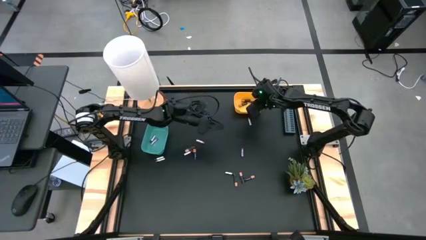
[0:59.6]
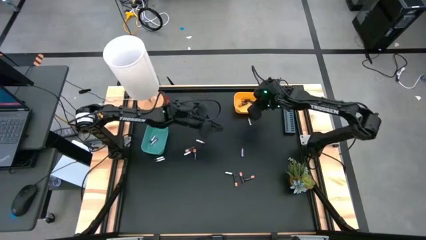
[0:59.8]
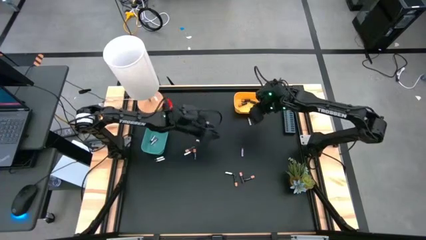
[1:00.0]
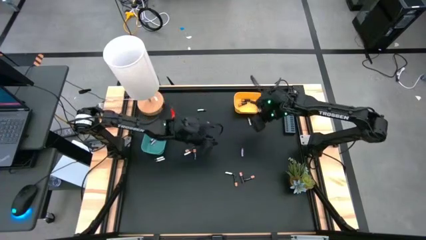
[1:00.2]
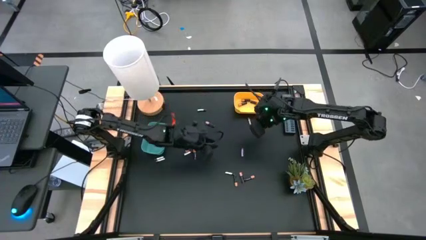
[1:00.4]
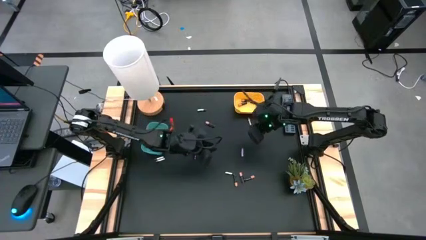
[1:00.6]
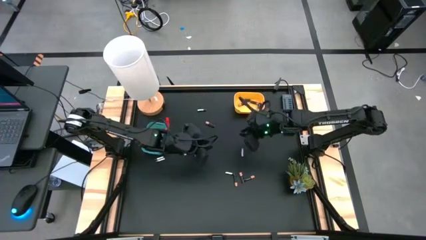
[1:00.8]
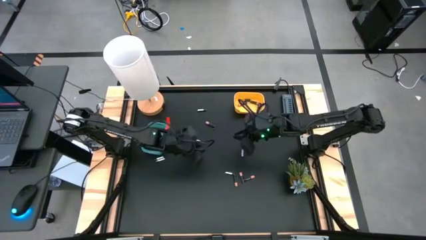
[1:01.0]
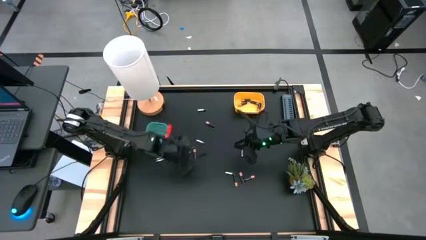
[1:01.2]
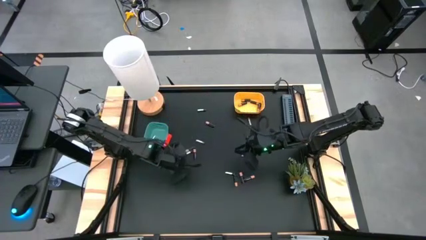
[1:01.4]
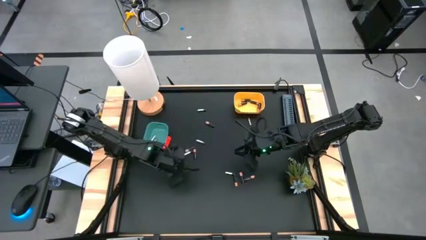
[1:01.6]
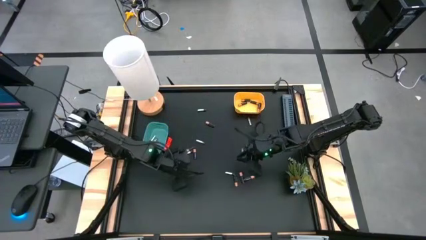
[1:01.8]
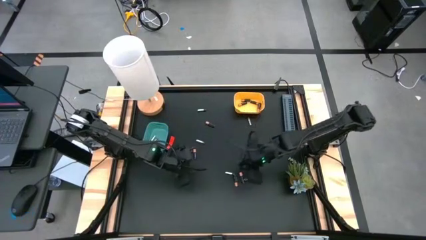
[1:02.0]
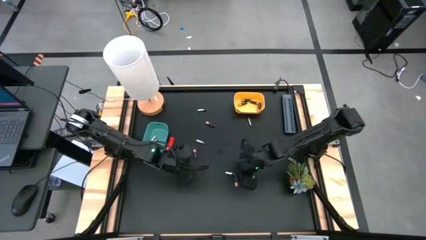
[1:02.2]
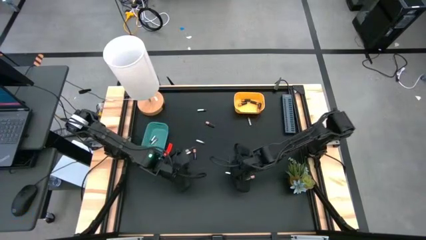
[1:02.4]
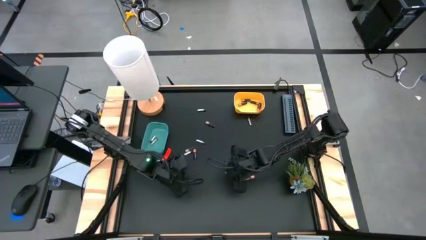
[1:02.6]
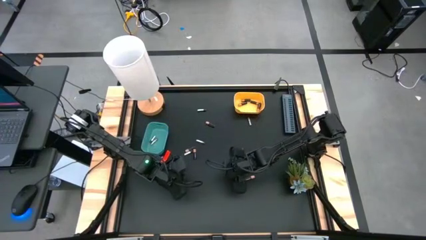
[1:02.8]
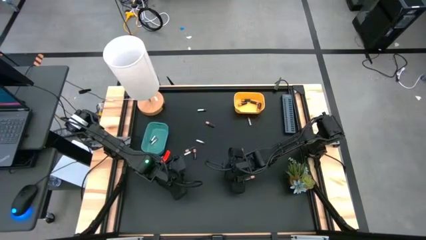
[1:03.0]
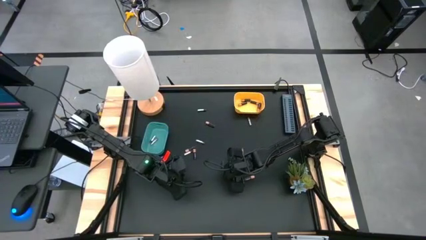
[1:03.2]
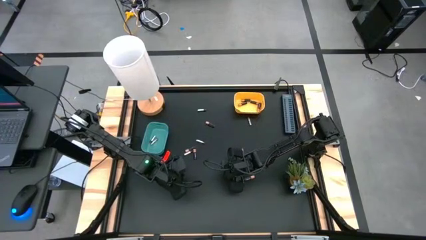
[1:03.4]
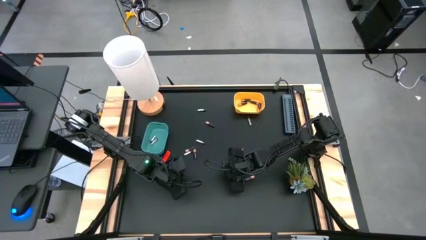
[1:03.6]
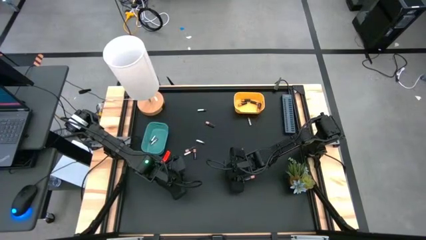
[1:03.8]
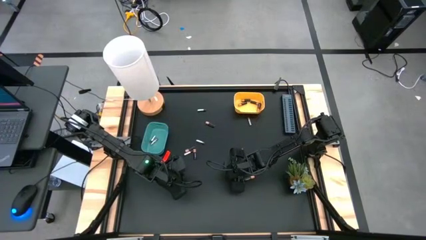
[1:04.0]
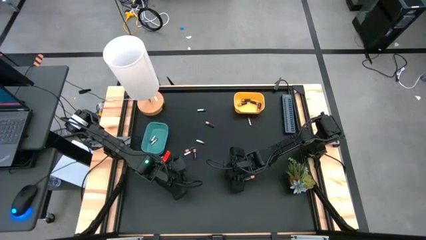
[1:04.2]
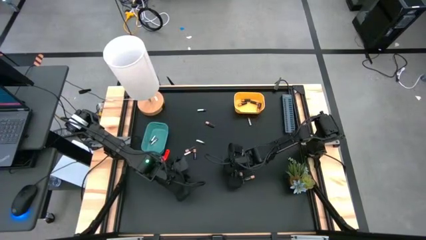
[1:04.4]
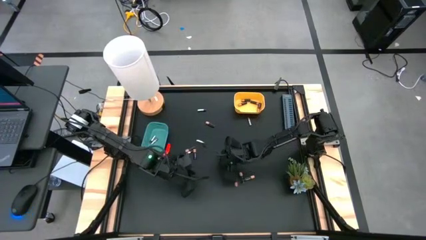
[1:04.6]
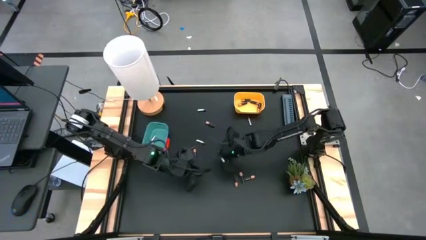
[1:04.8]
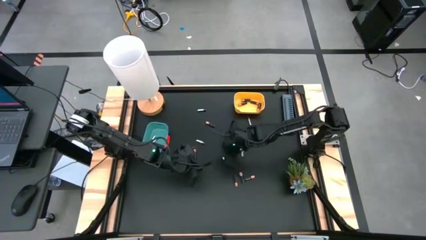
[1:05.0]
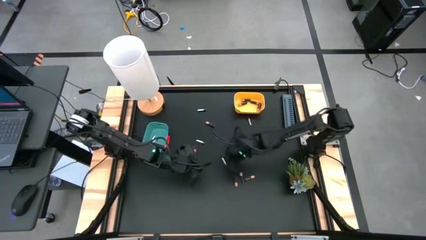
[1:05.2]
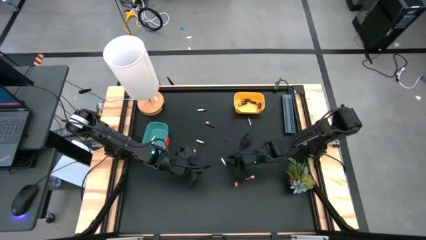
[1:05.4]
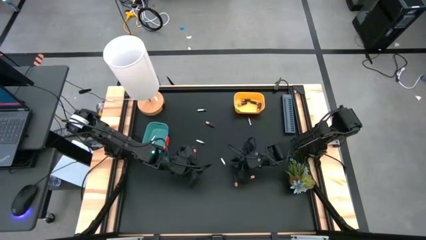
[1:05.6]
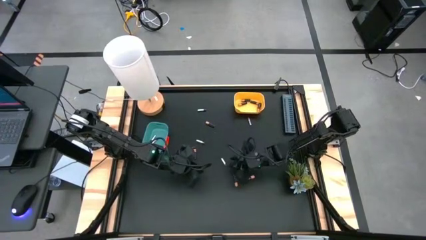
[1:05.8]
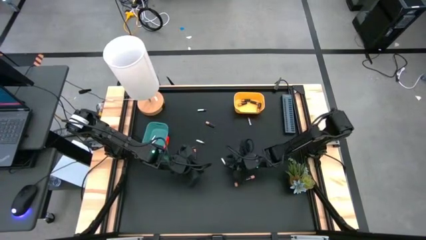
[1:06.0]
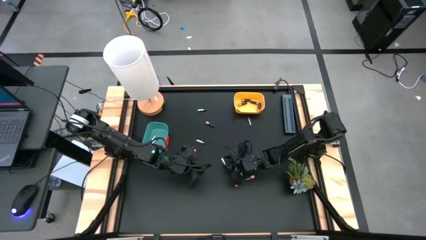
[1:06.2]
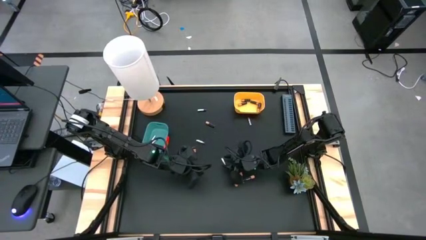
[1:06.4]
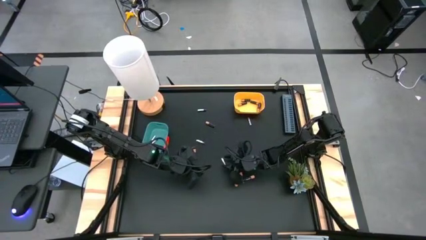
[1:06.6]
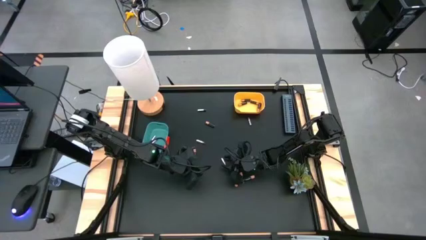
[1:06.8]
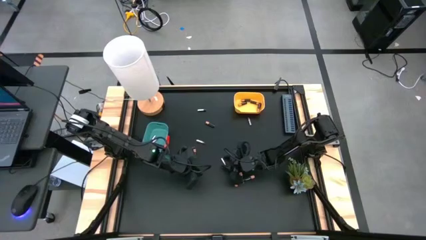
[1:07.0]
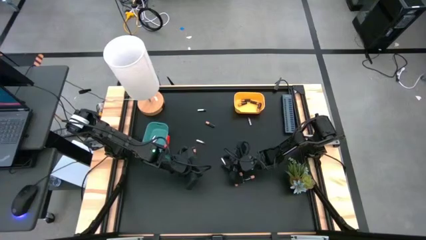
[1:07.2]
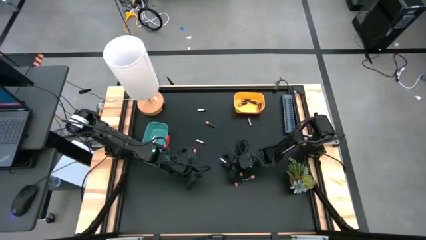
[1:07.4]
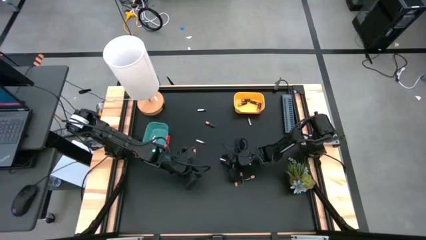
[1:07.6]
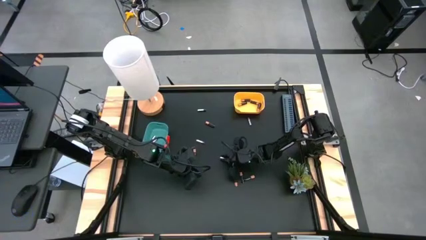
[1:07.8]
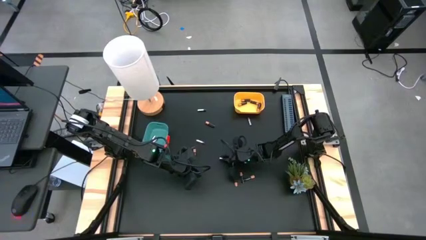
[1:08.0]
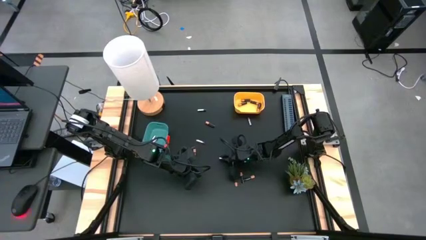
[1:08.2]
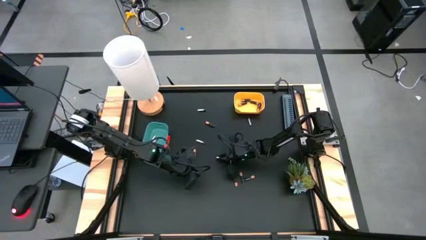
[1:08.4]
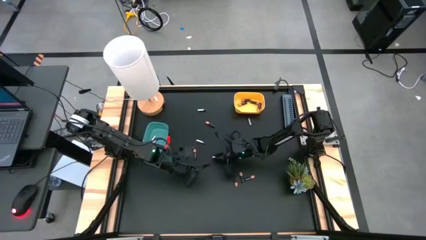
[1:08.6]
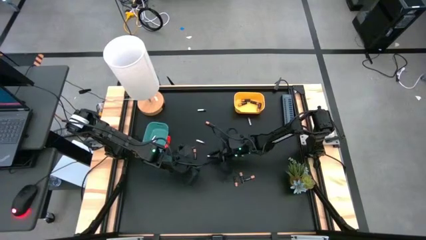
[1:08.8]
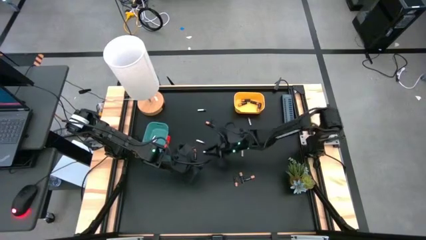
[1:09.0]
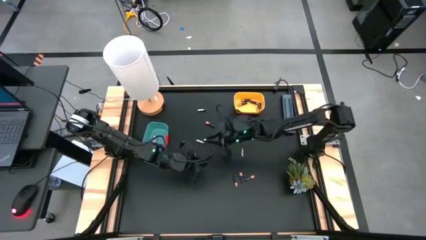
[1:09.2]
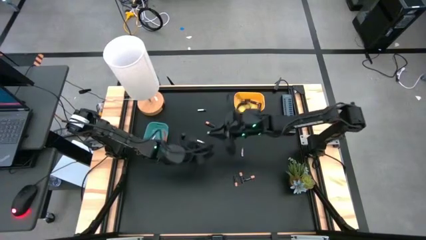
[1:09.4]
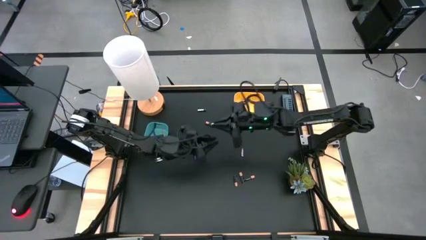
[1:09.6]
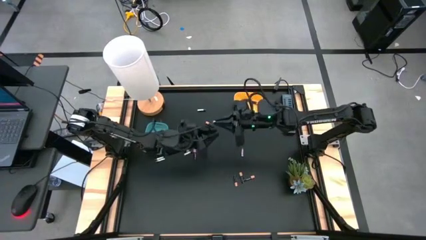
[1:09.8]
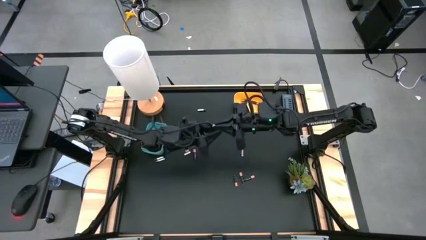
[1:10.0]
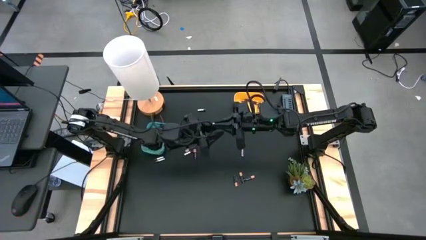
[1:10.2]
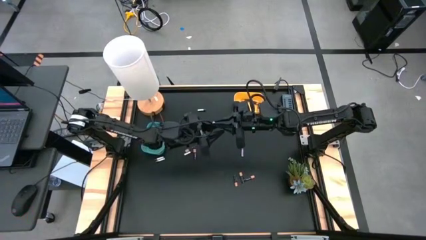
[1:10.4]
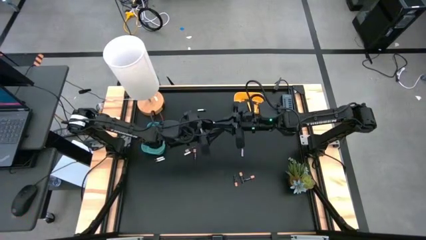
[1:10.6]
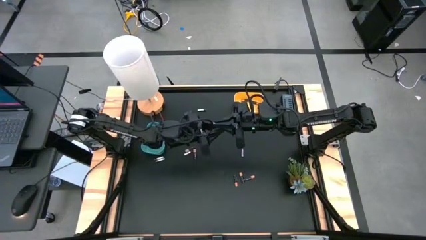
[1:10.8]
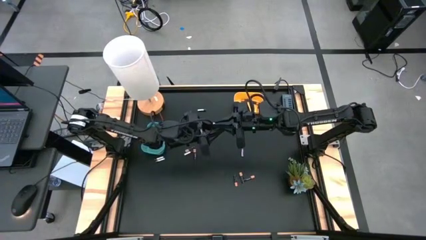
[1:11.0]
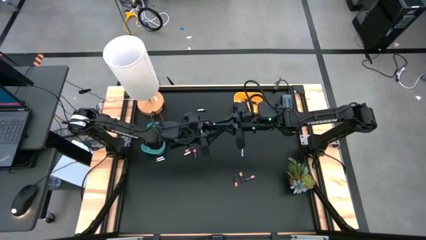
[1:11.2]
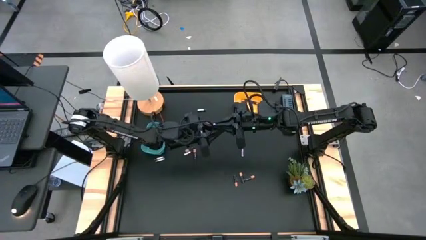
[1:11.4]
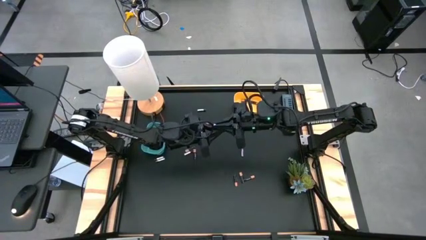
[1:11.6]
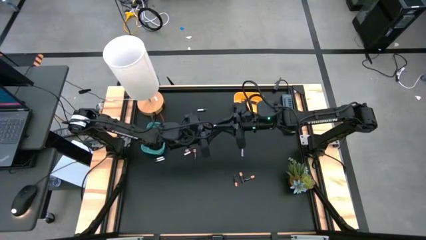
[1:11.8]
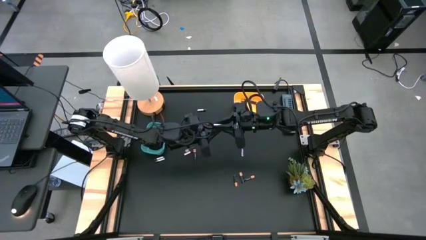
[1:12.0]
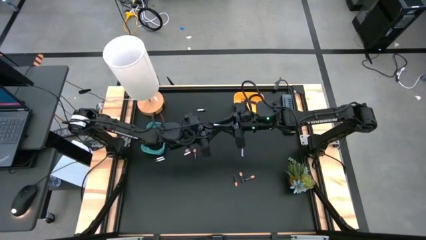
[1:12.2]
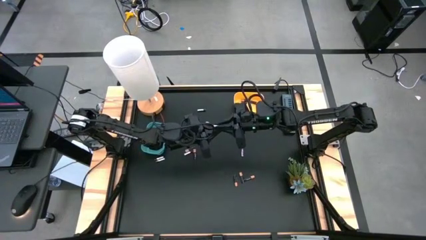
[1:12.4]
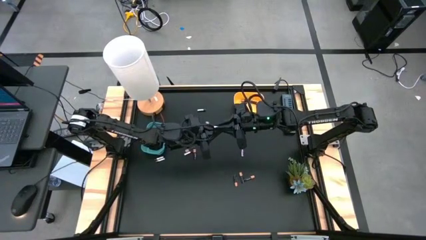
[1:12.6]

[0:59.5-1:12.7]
Task: Sort batteries
Put the silver battery into the green bin

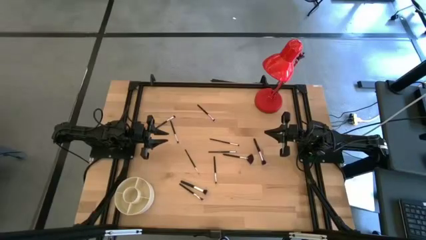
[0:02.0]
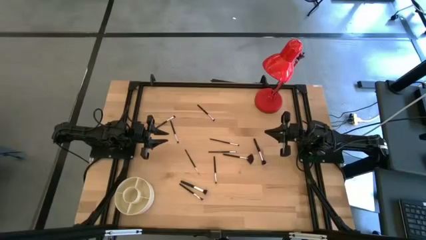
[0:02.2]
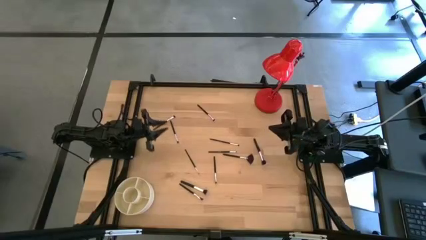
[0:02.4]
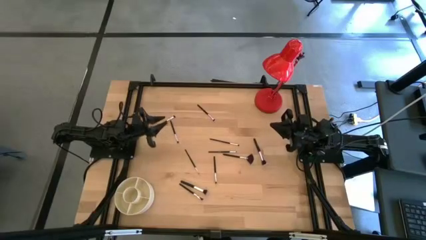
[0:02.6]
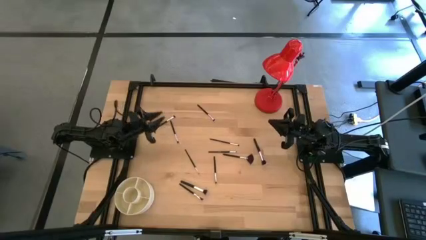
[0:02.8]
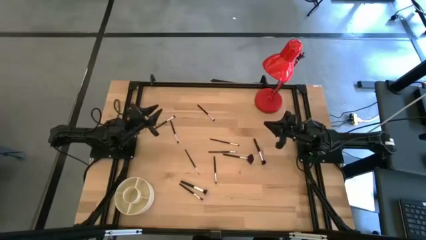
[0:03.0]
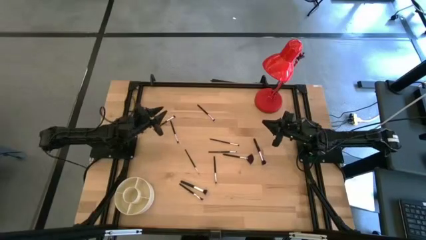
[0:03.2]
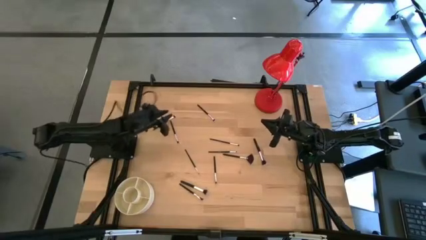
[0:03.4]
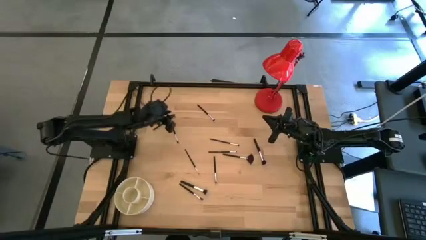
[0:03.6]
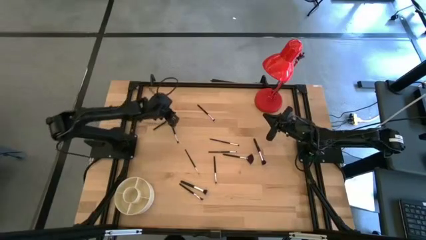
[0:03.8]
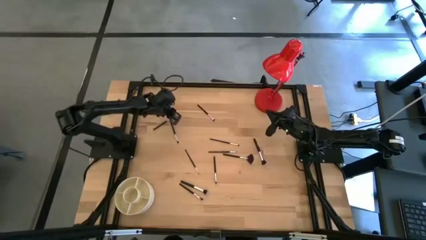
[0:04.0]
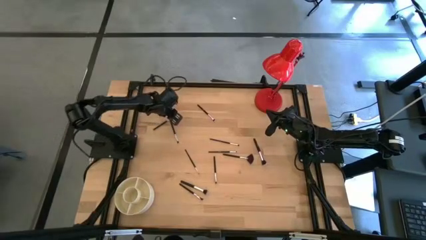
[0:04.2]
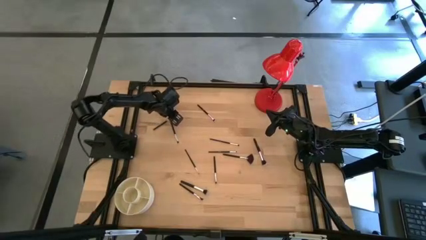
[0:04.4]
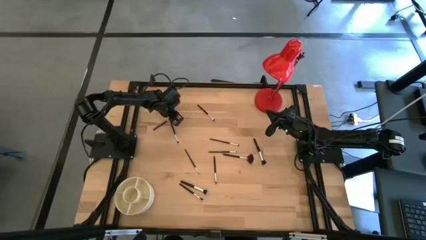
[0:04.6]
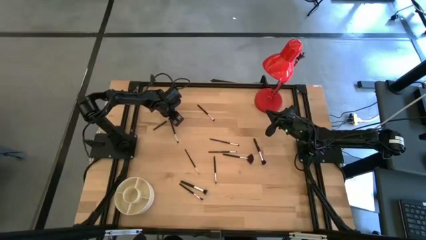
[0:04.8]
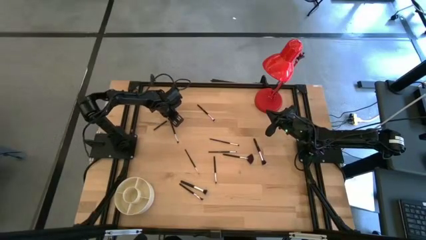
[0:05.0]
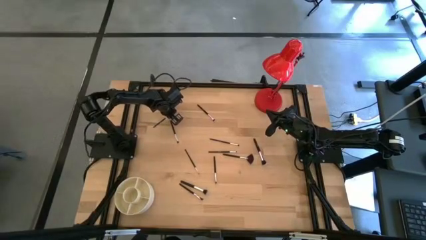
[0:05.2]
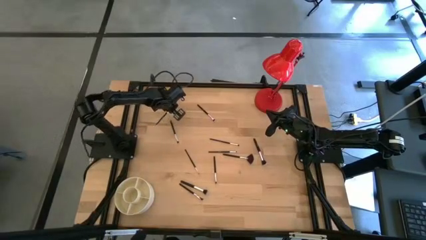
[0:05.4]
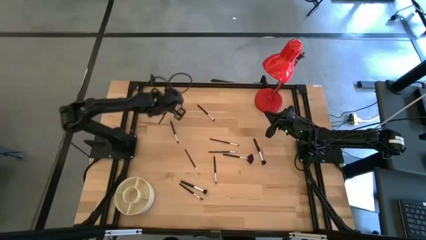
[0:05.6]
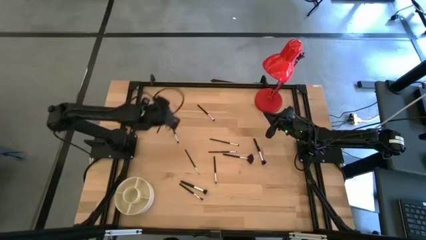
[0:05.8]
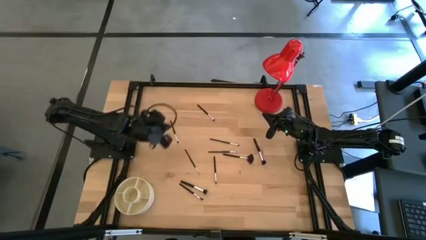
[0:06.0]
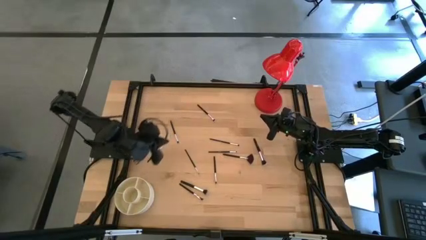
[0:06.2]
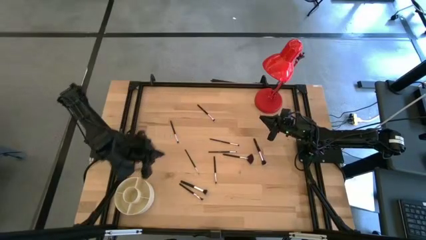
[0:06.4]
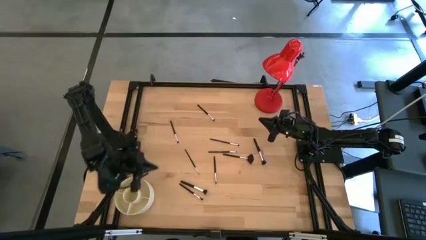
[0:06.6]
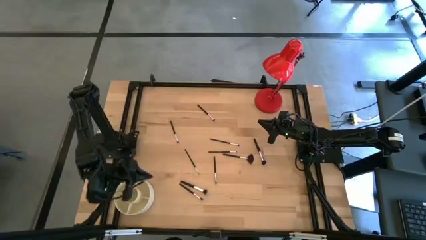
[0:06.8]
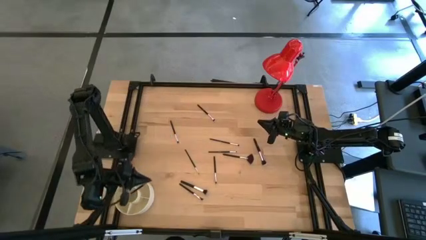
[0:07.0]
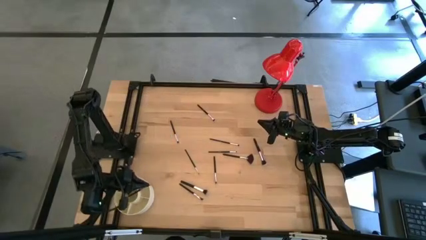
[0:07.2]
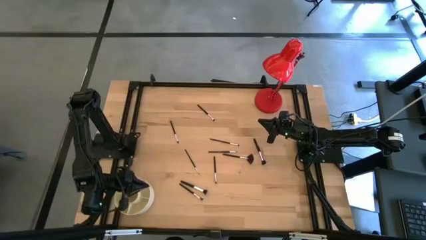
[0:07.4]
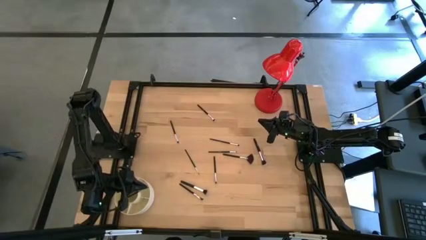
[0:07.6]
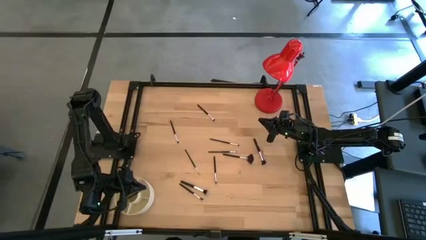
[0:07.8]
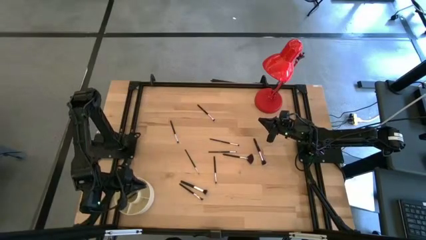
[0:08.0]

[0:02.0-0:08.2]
Task: Pick & Place Makeup Brushes
Put the black eyeshadow brush into the makeup organizer
